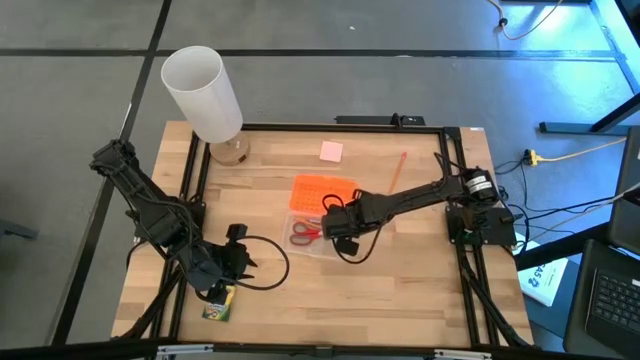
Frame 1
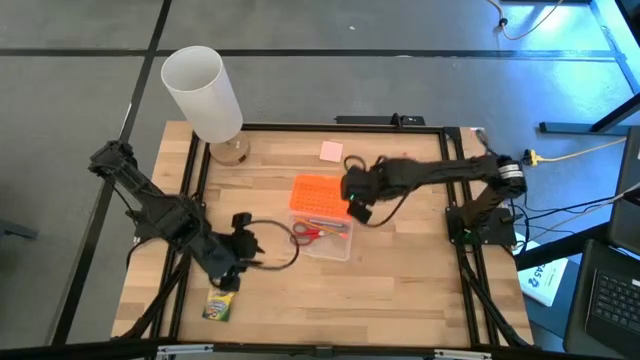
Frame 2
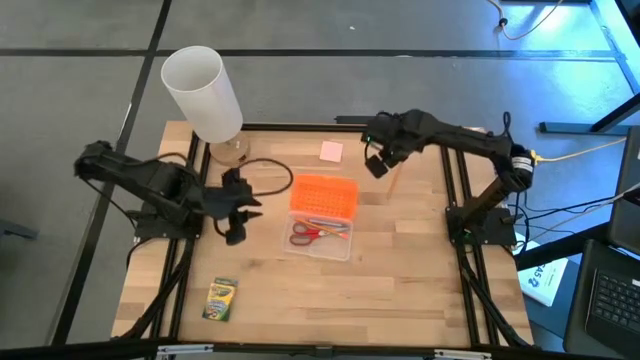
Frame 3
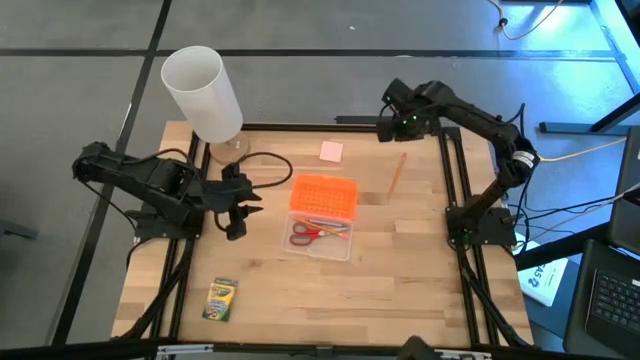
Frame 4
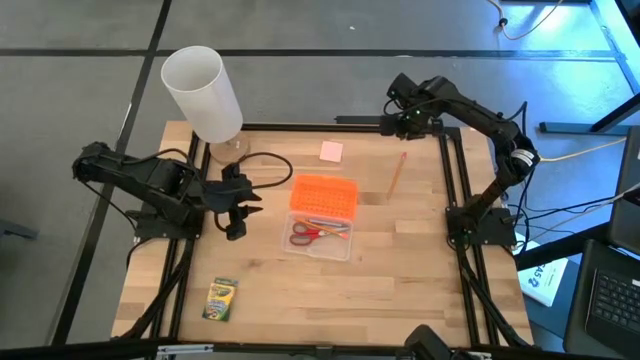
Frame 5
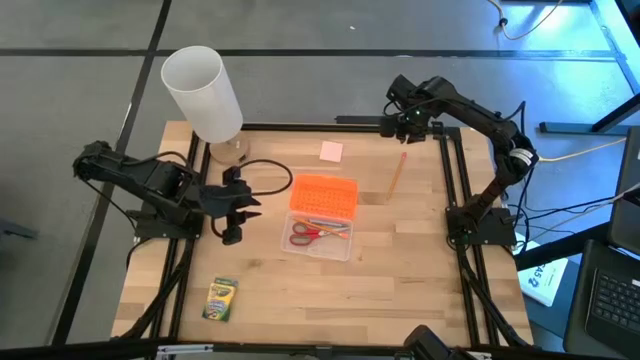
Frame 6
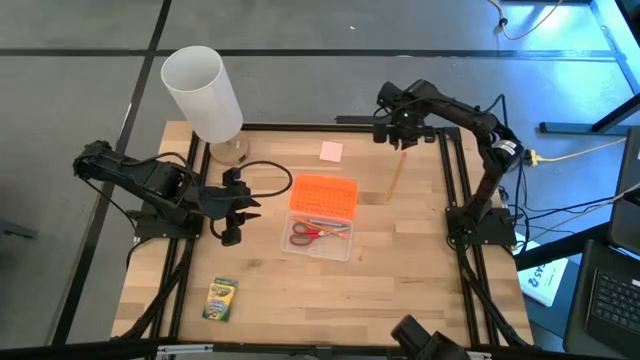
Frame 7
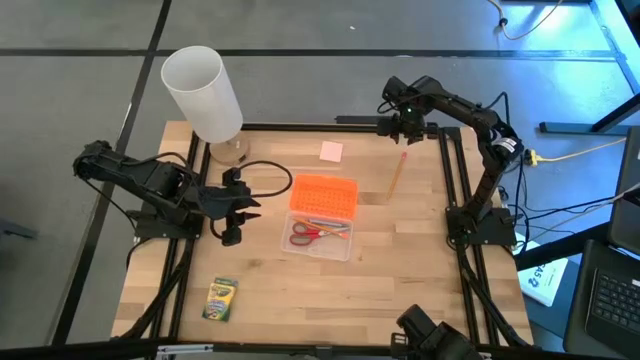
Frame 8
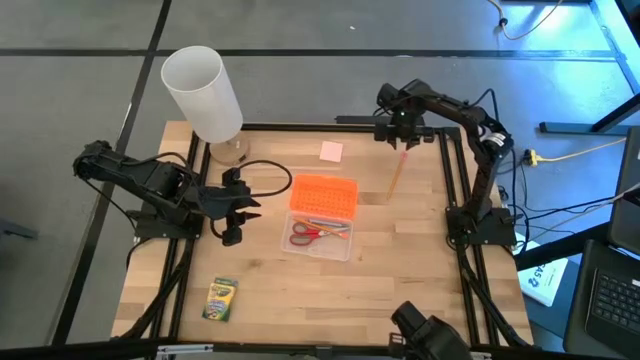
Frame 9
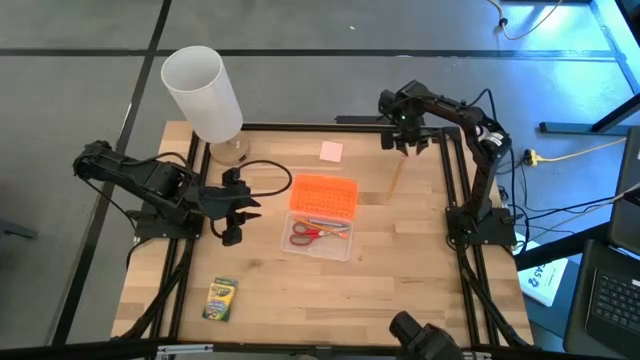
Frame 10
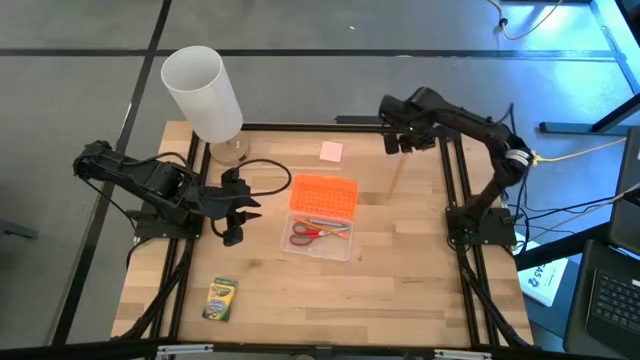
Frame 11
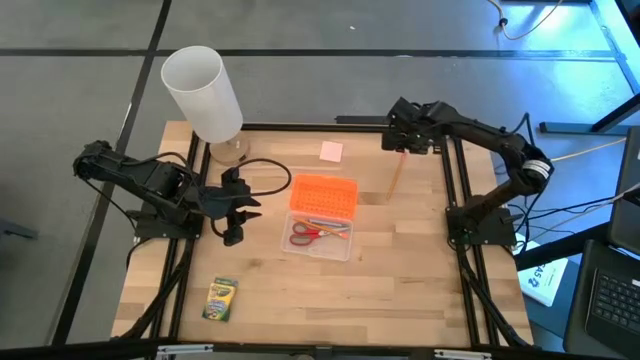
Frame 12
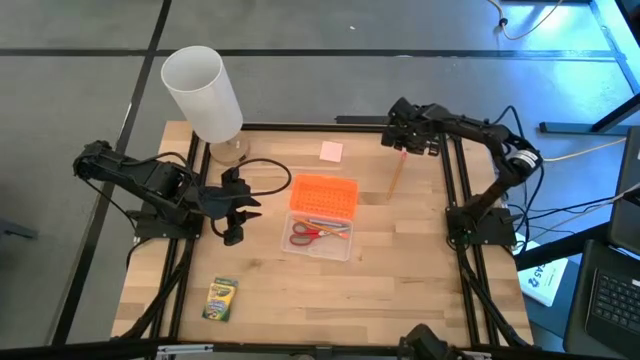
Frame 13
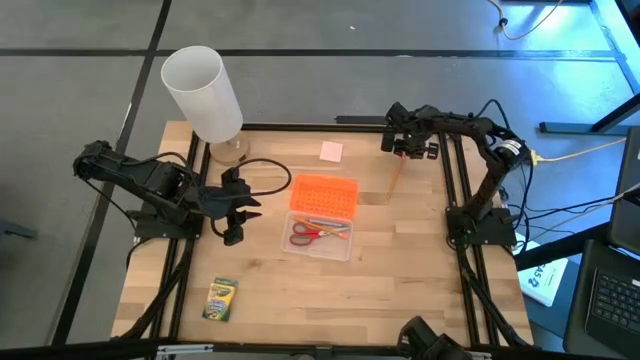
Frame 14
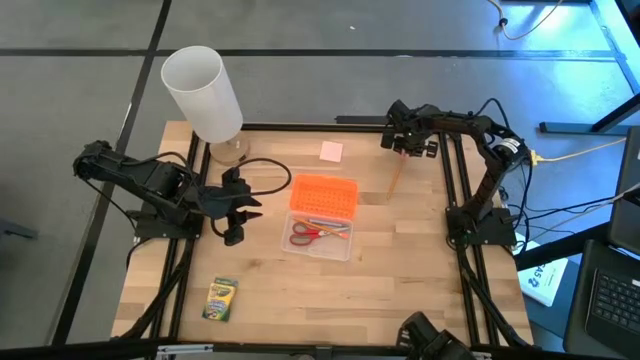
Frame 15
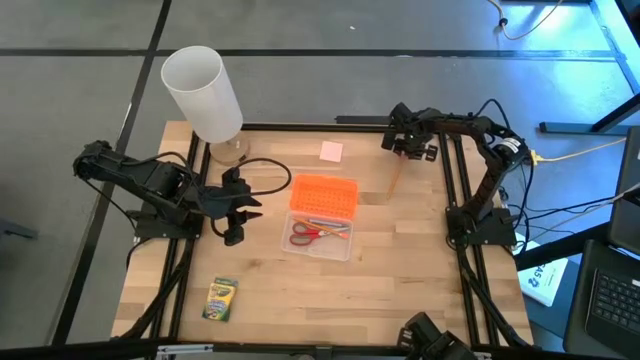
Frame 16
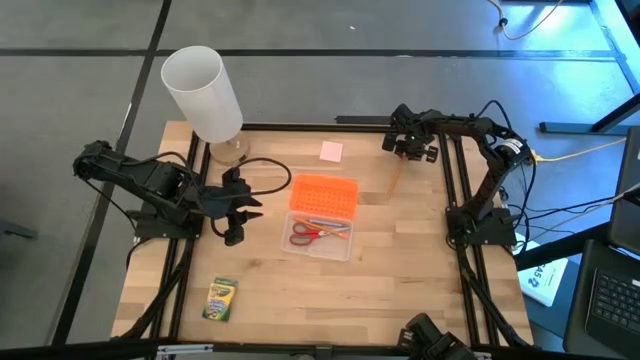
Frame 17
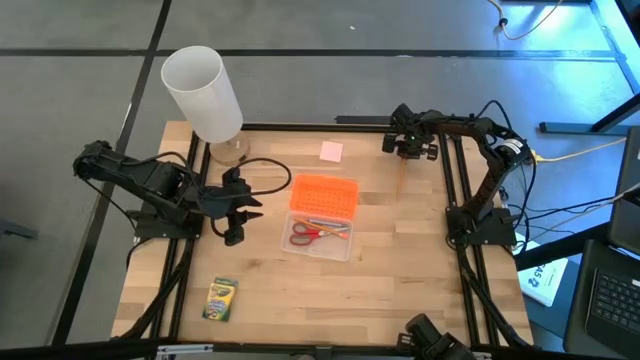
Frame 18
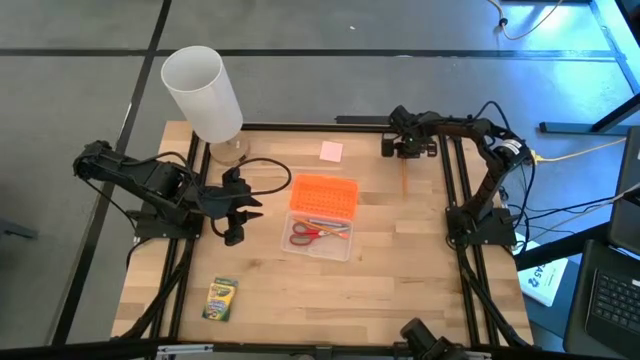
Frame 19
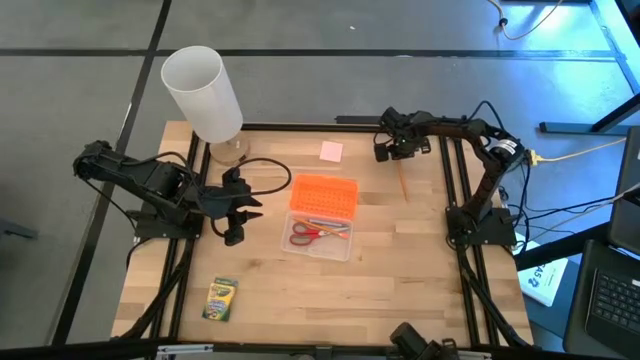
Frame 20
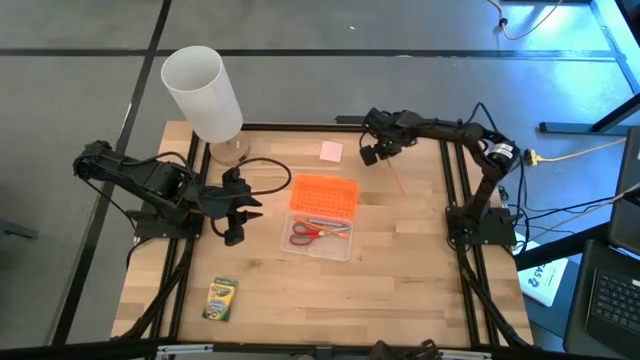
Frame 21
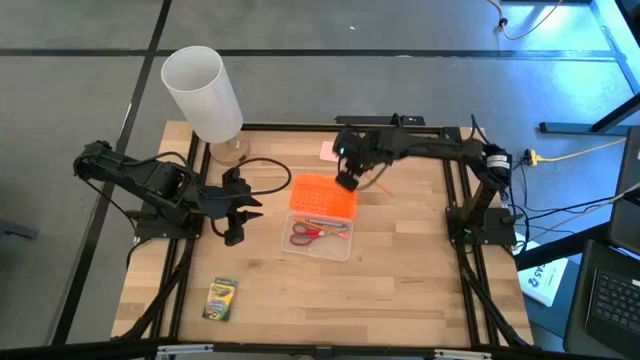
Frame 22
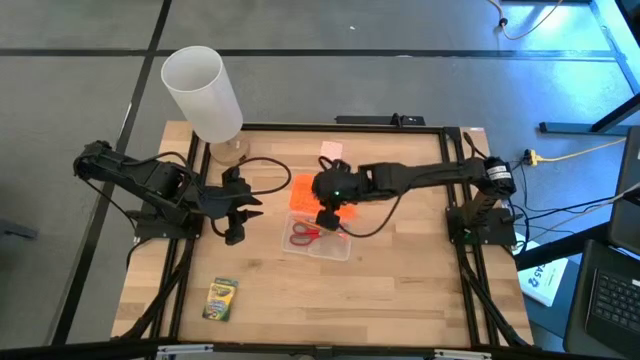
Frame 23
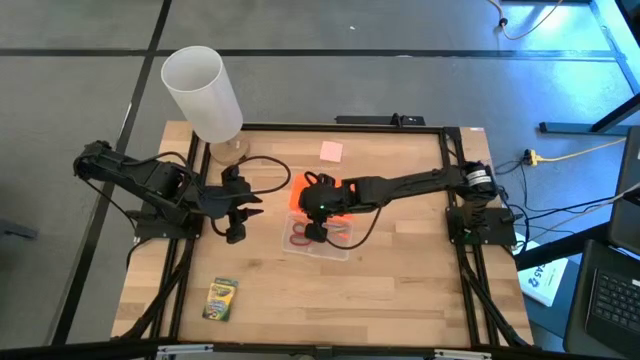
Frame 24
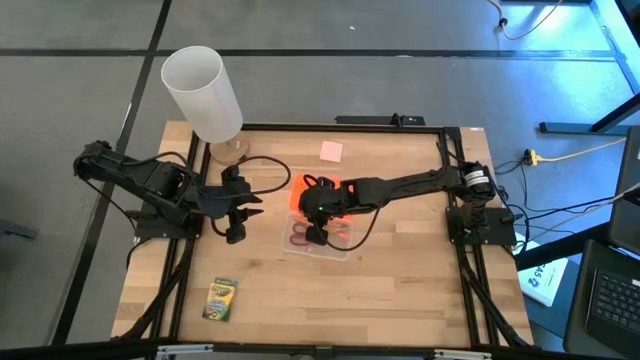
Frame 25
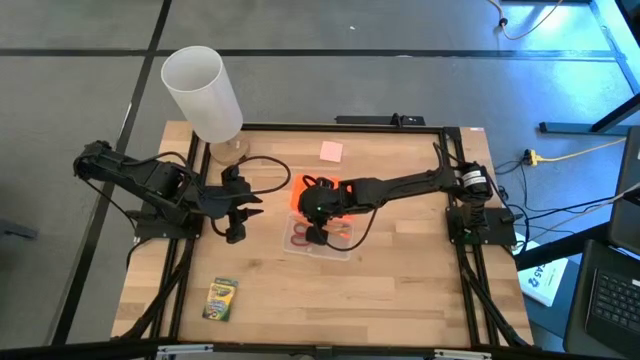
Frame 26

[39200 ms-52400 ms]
Task: Pack school essentials
Put the orange pencil into the orange supply box

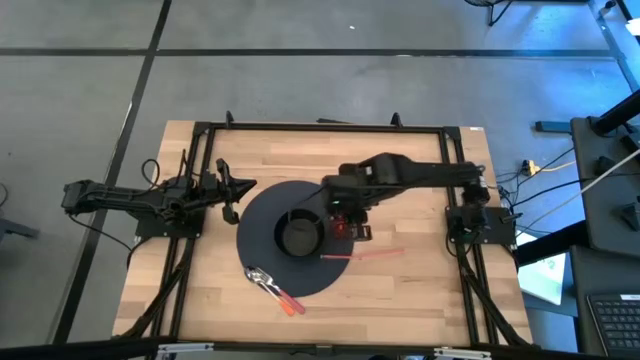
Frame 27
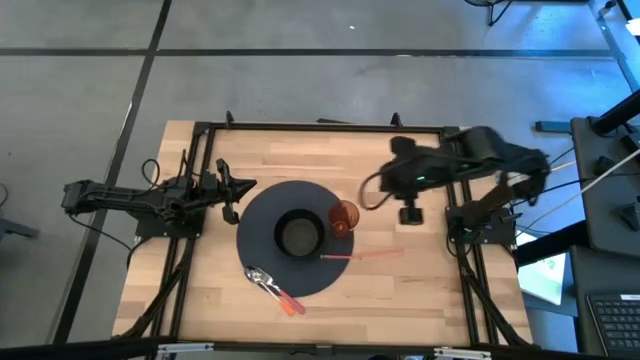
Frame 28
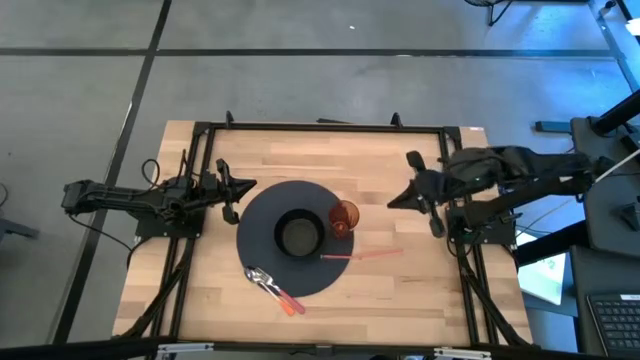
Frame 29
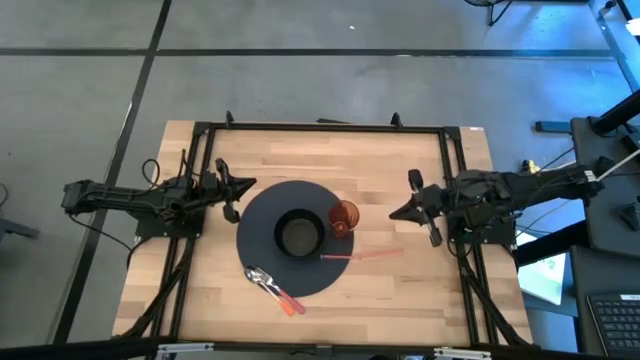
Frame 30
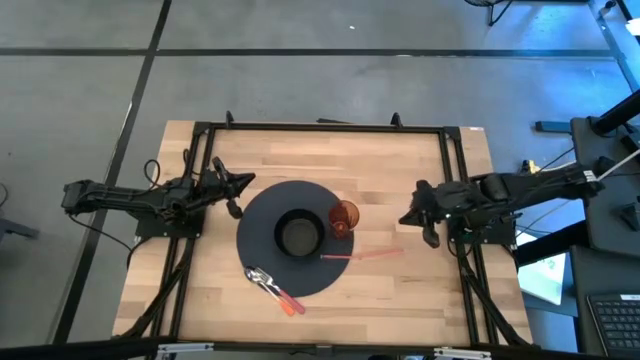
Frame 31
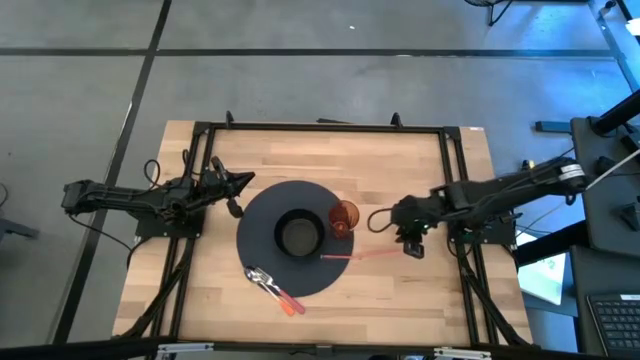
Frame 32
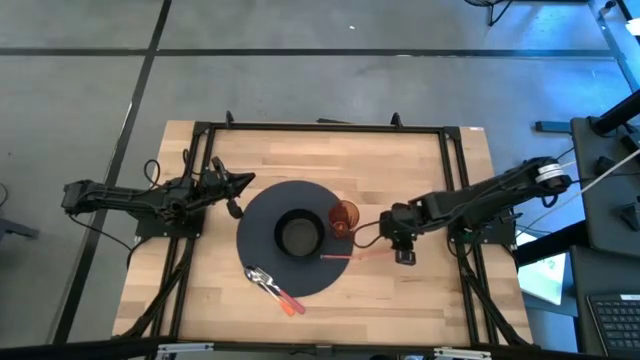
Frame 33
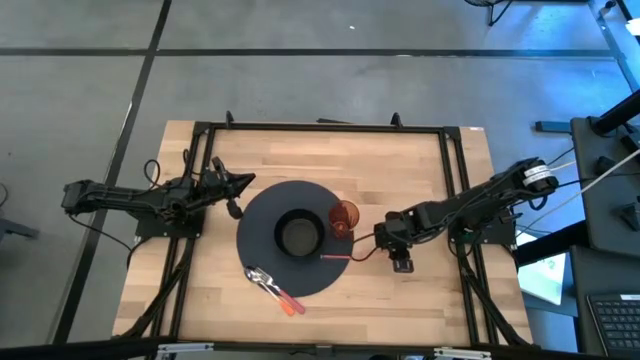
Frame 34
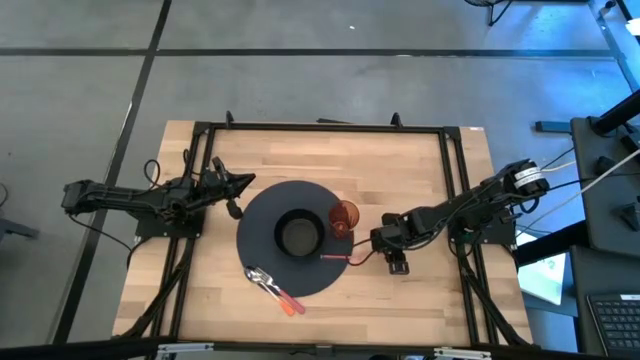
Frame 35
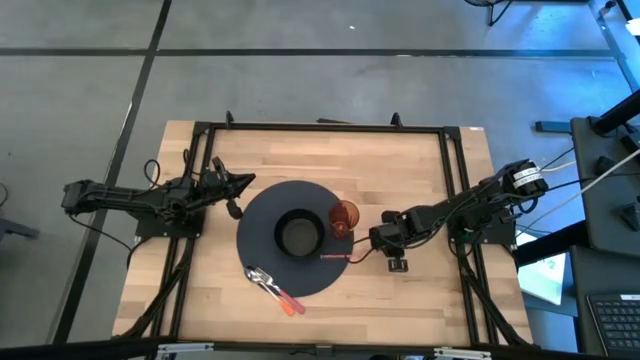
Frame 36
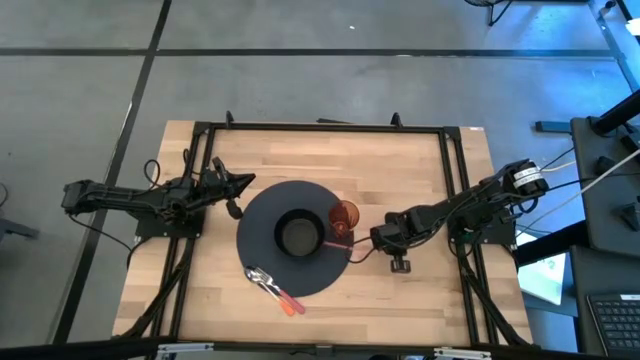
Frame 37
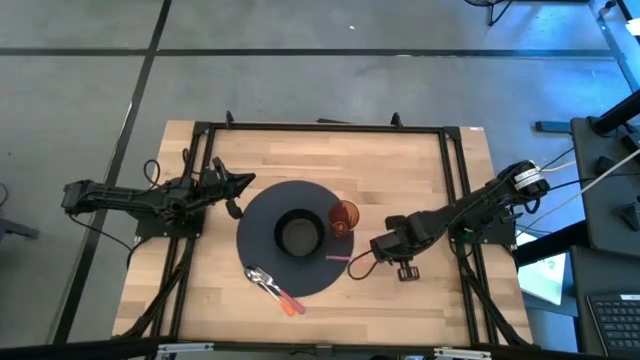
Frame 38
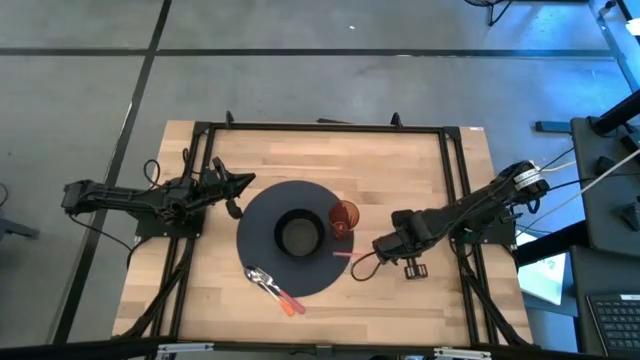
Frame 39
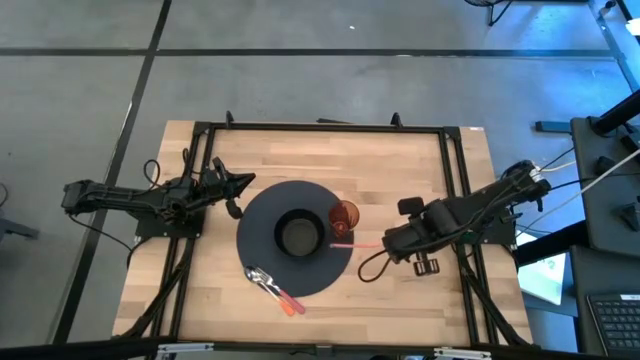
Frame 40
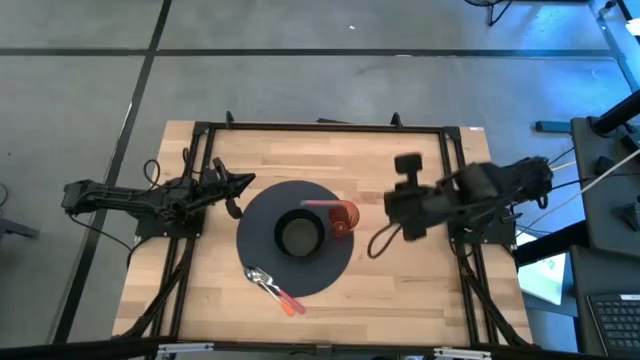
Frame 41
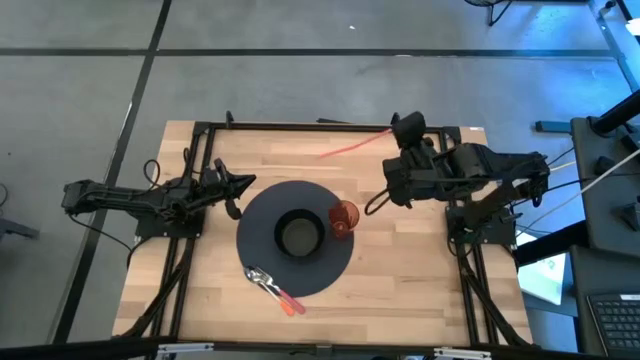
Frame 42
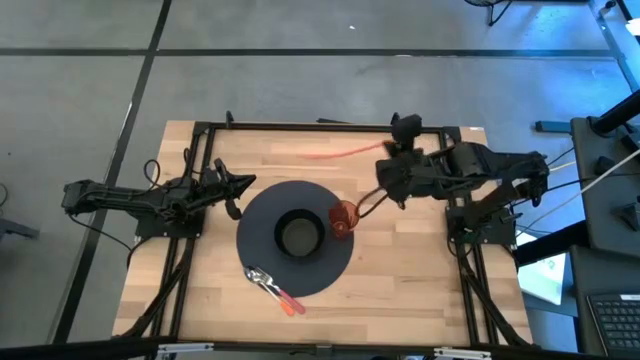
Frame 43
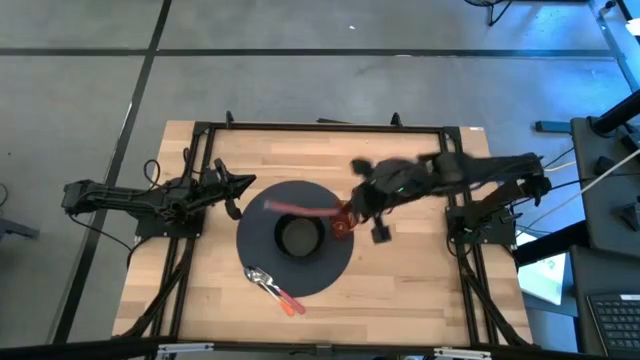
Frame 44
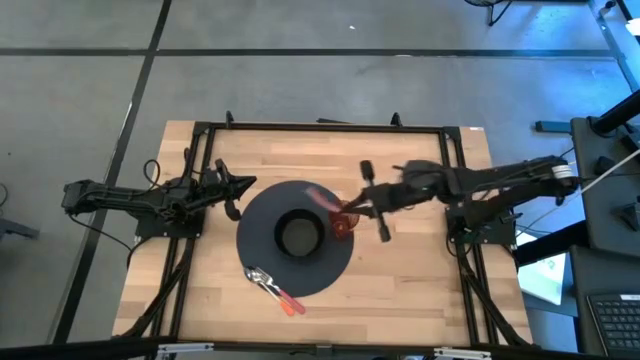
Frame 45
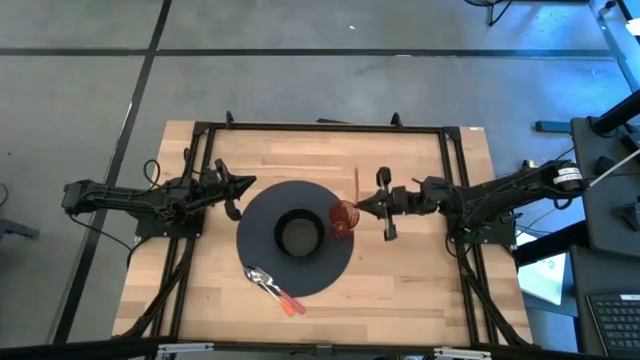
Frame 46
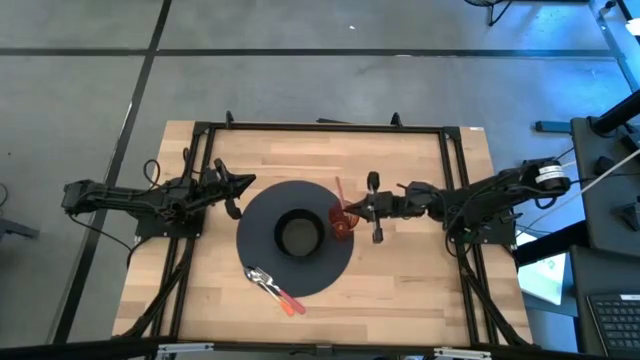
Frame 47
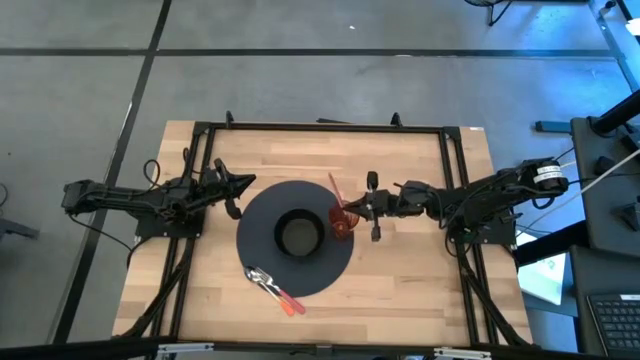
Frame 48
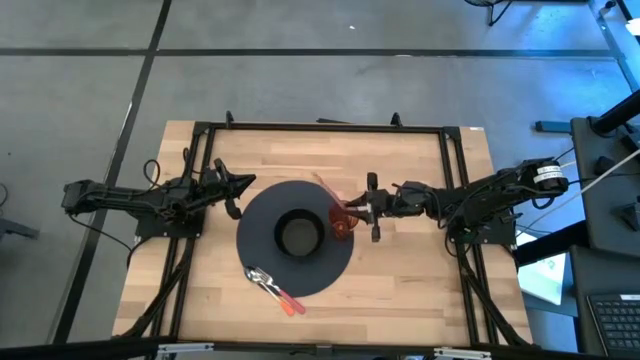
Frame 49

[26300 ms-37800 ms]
Task: Pick & Place Utensil
Put the red straw into the orange cup
